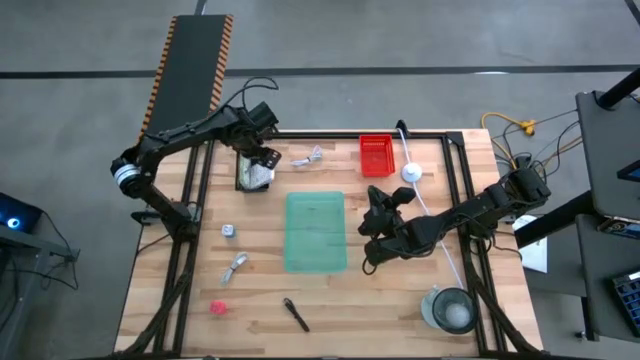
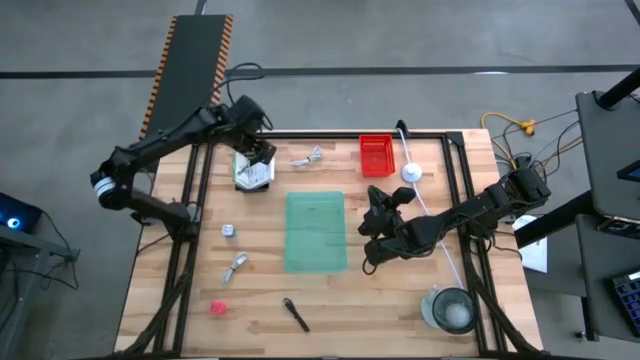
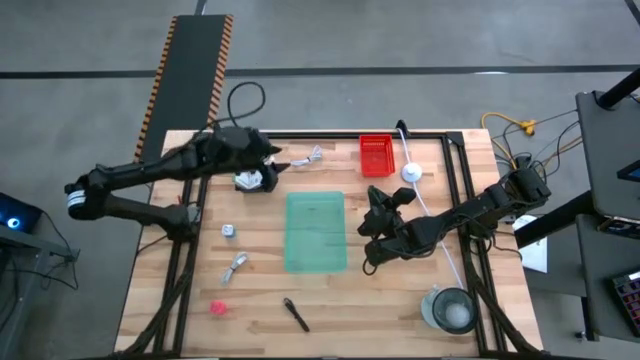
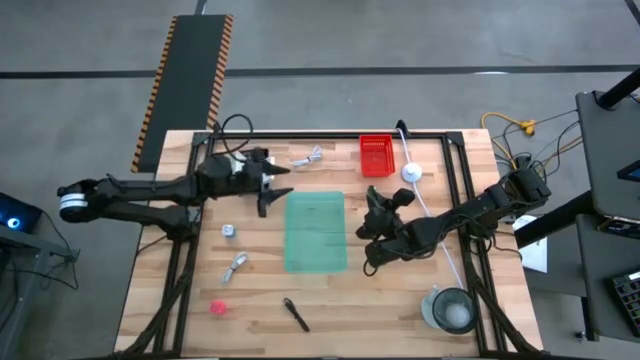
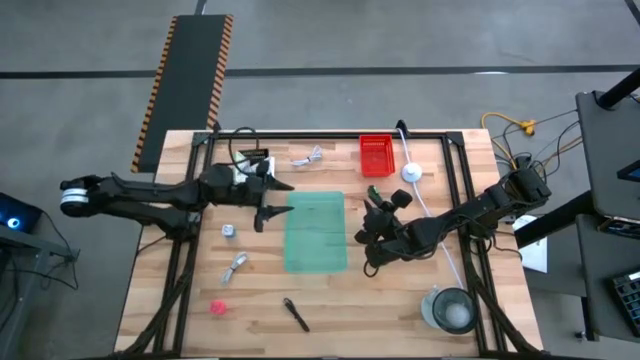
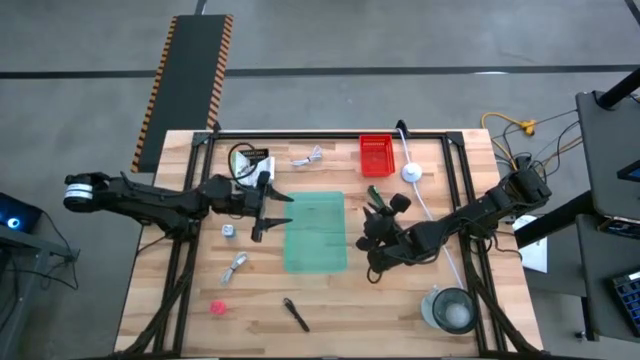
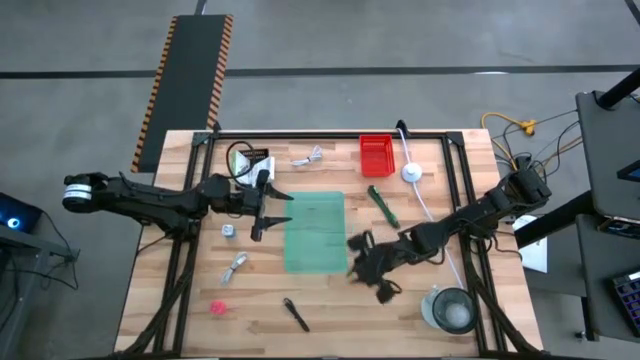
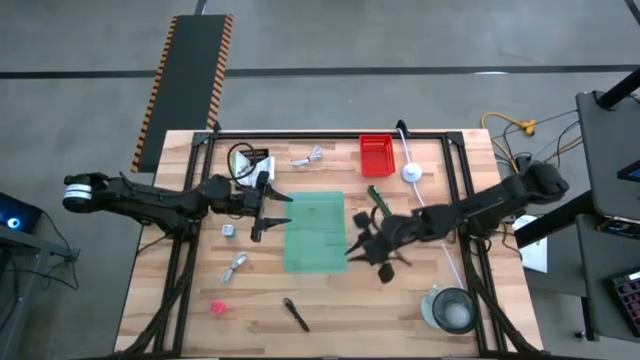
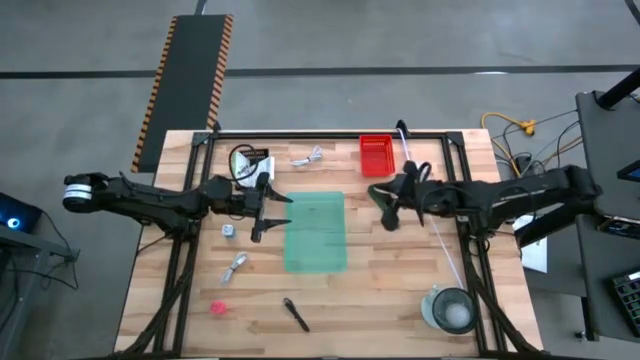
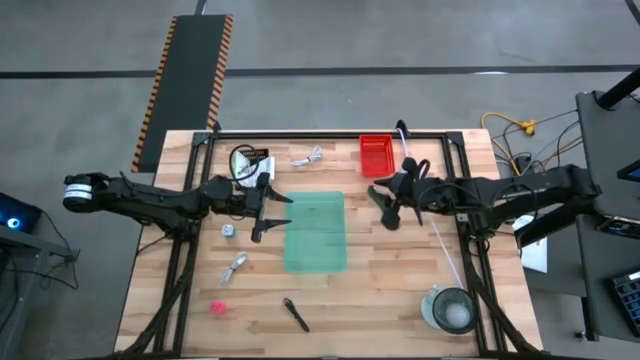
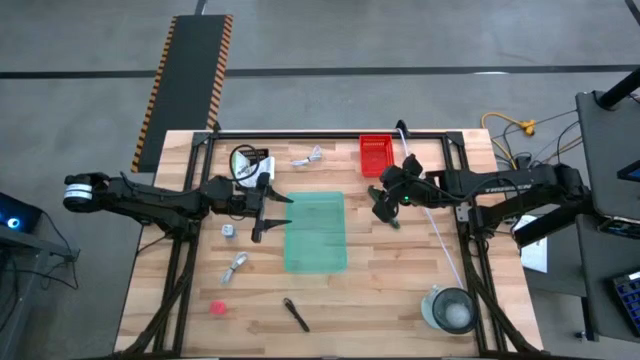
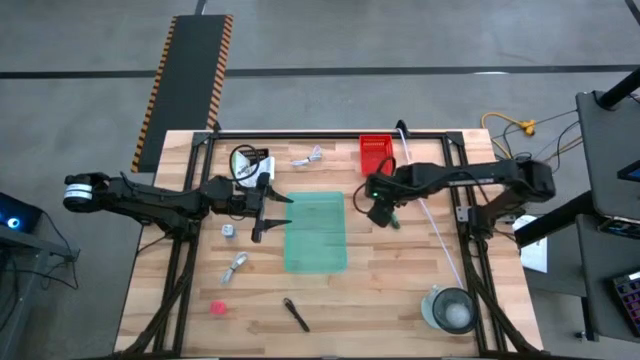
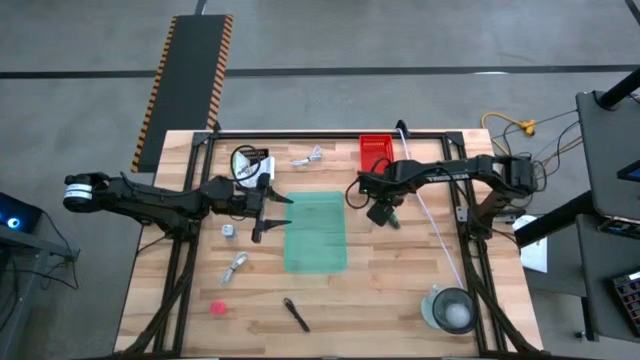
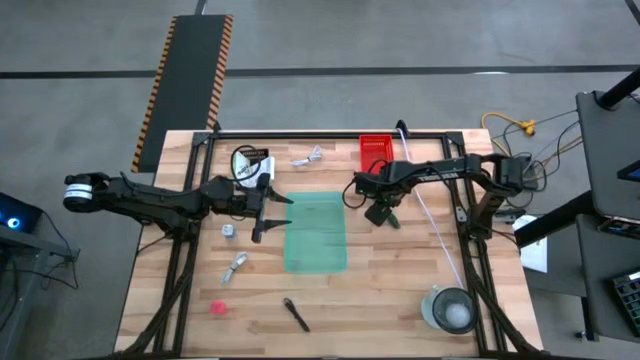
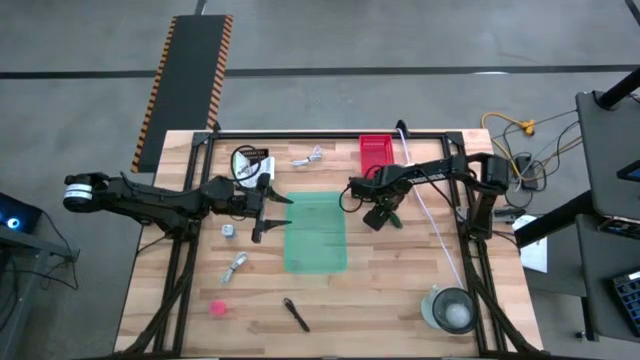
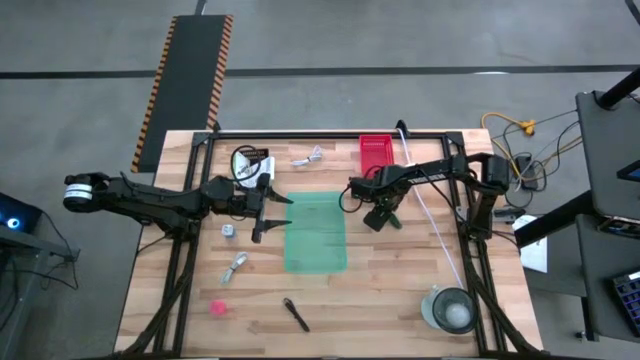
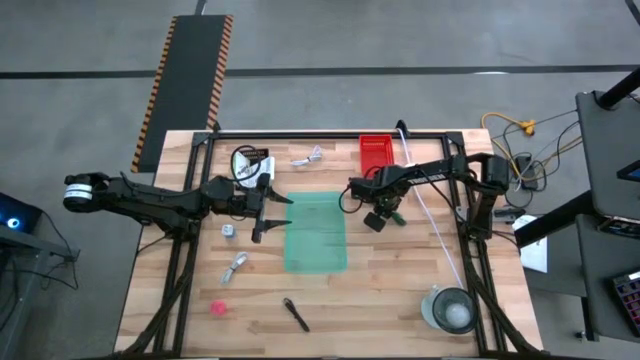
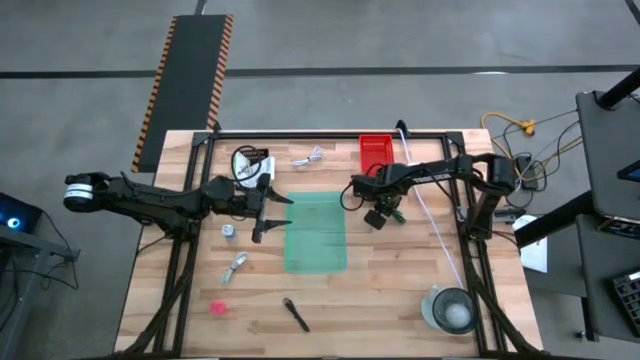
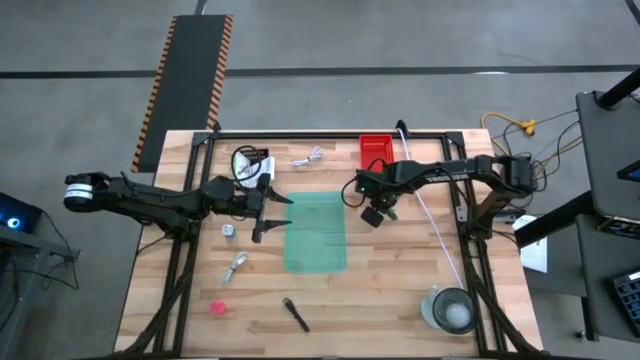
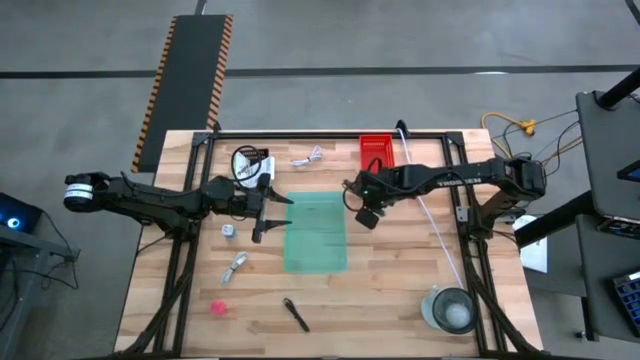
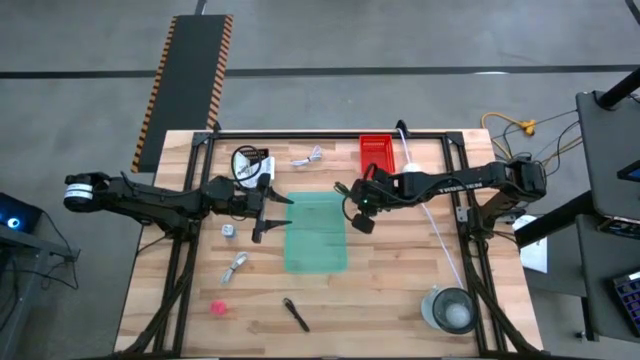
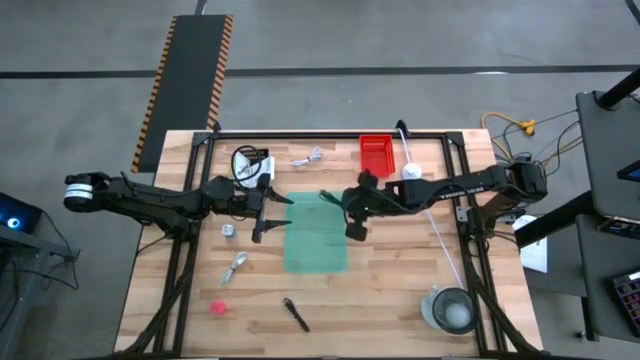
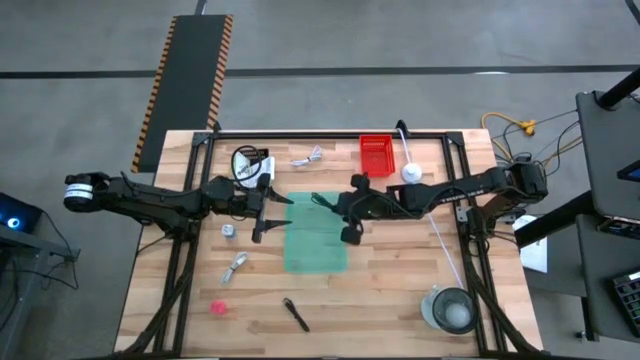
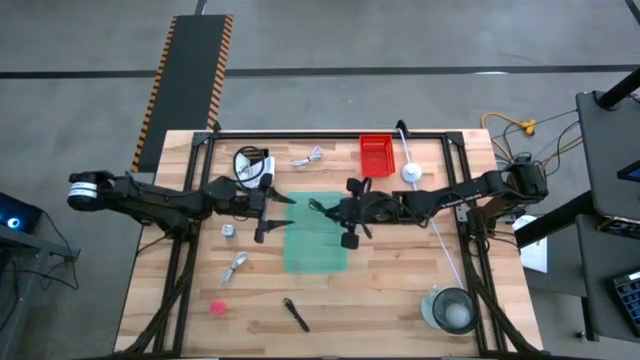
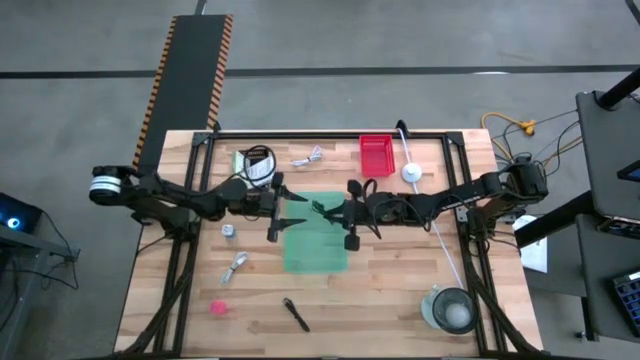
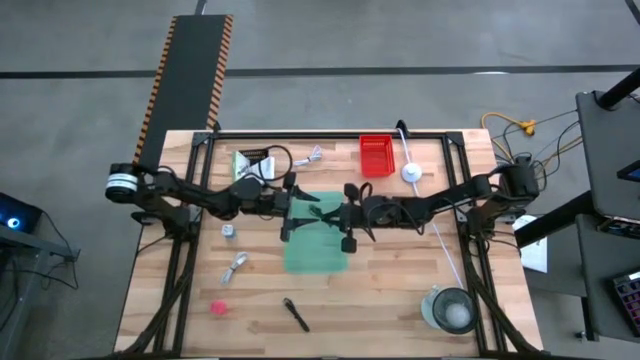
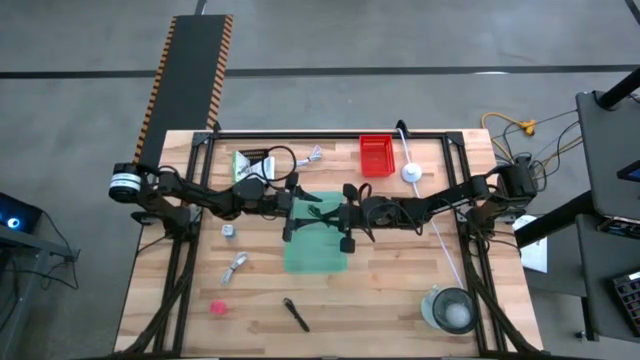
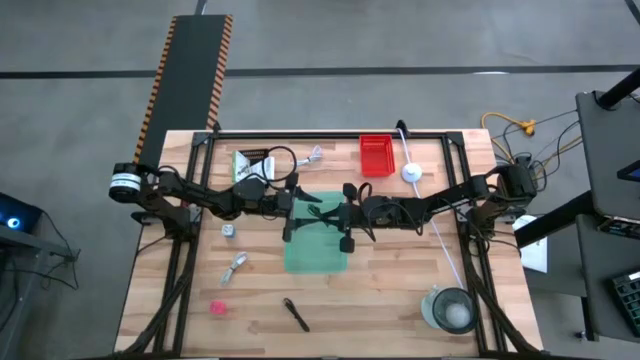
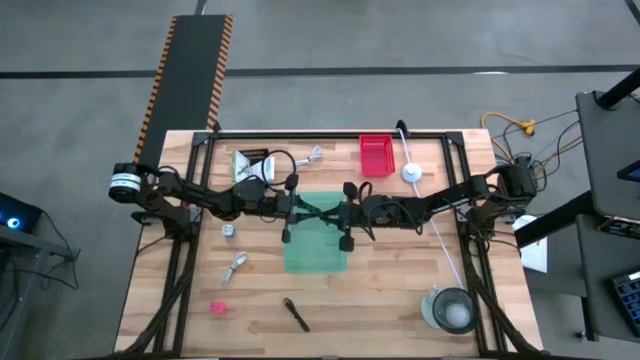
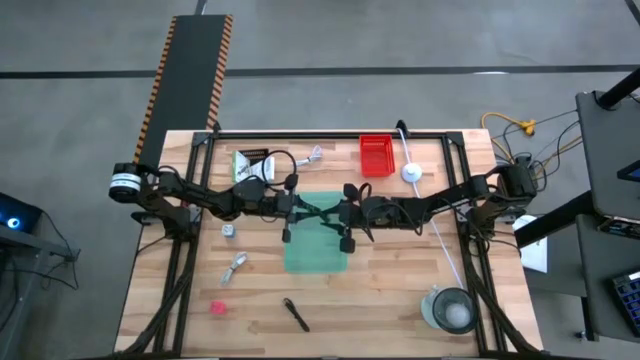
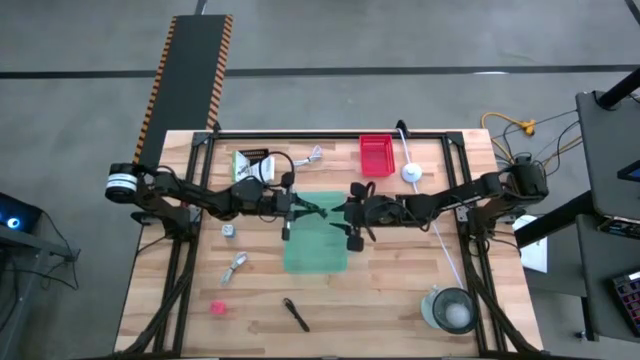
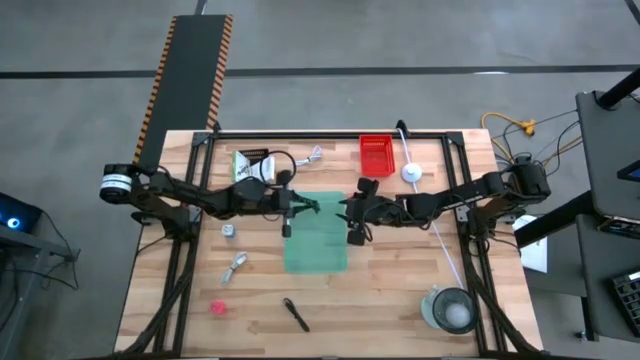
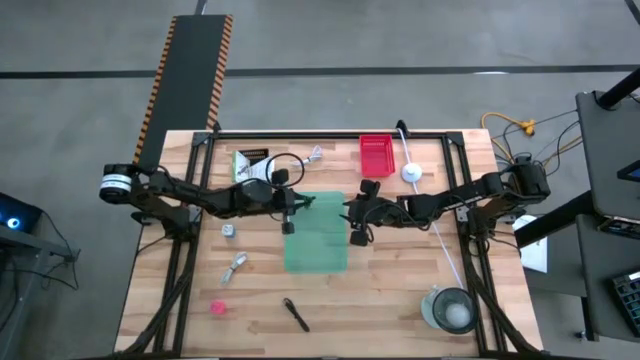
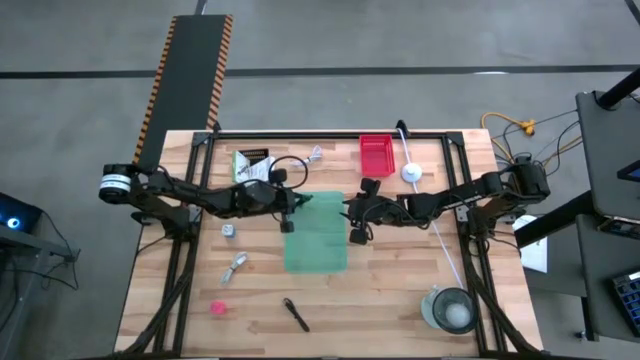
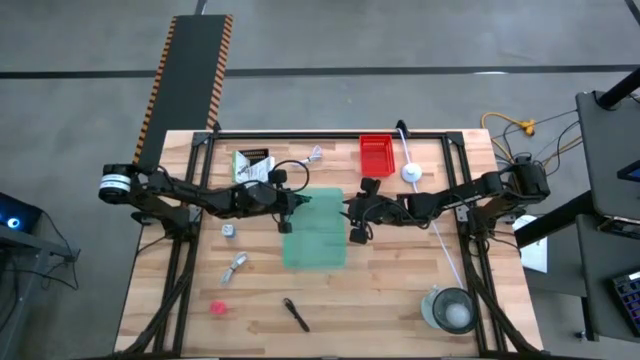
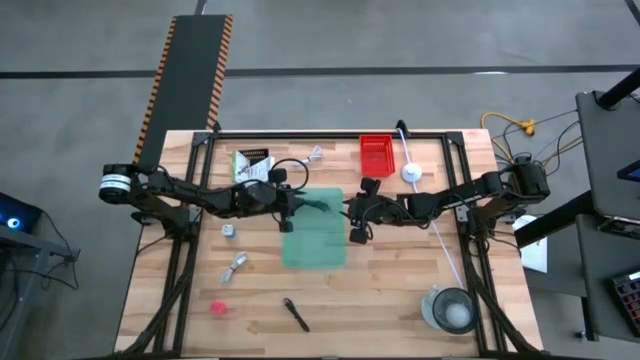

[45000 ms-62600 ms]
Task: Pick and place items into bin
Put the green charger cable into the blue bin

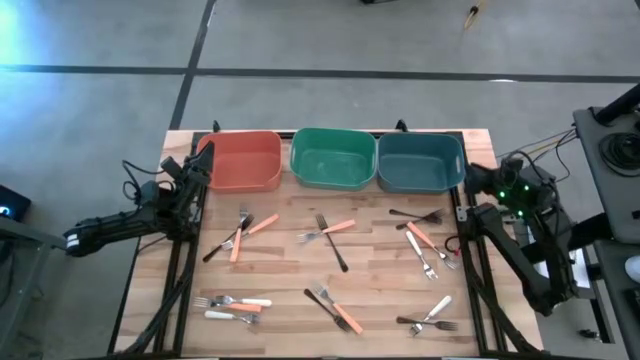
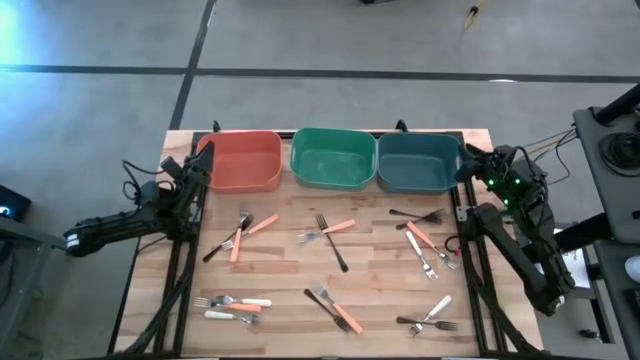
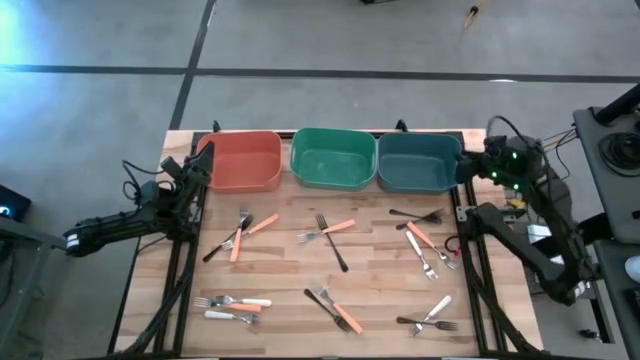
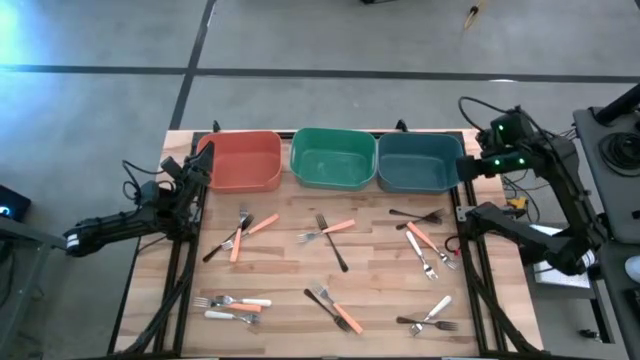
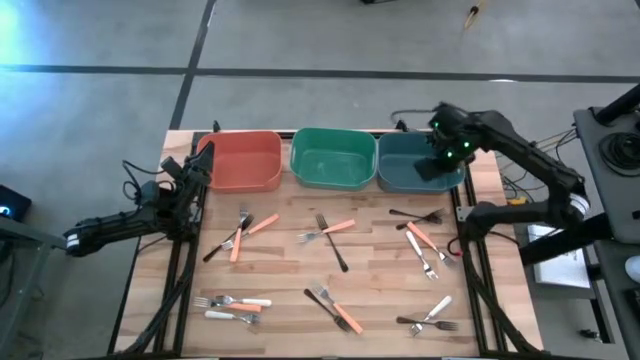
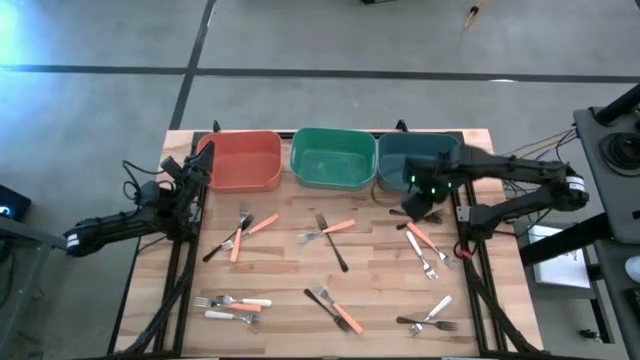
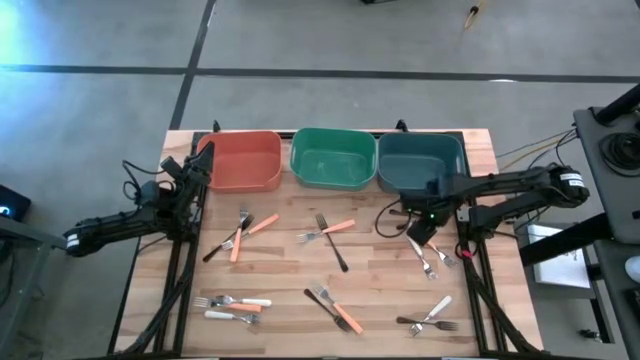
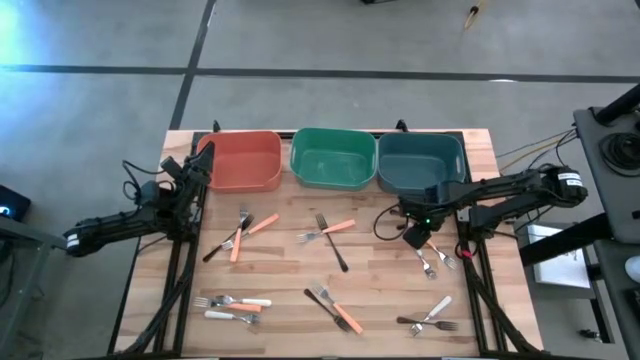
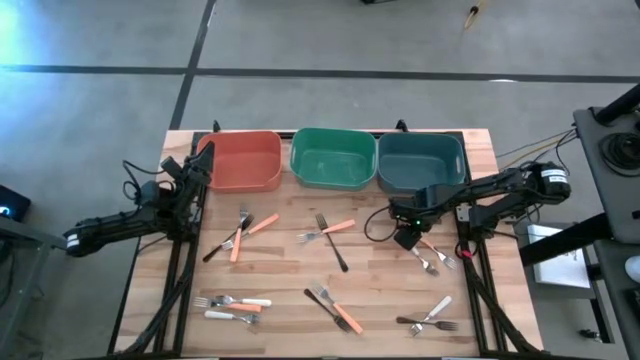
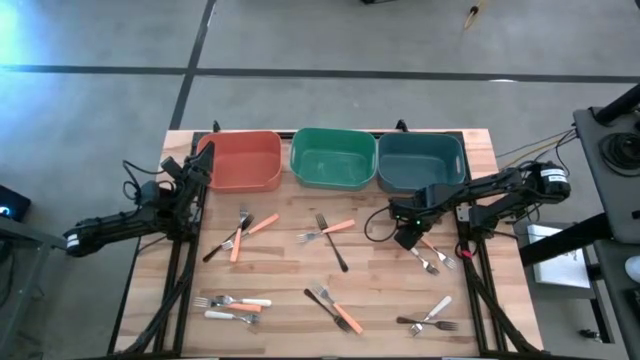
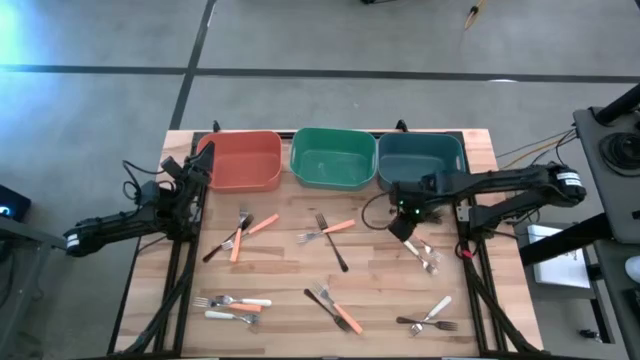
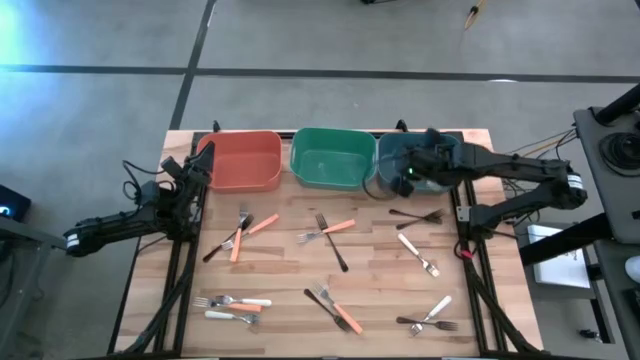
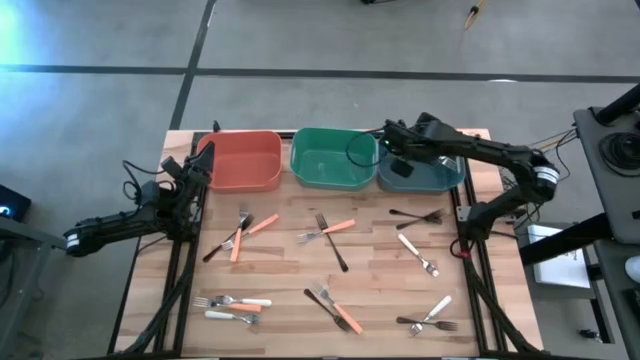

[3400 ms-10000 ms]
Task: Sort silverware by color (type)
Put the light orange fork into the blue bin
